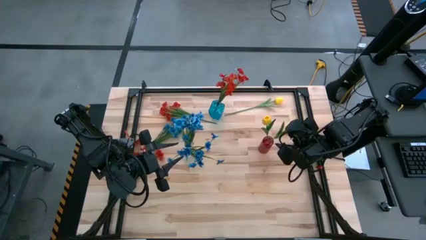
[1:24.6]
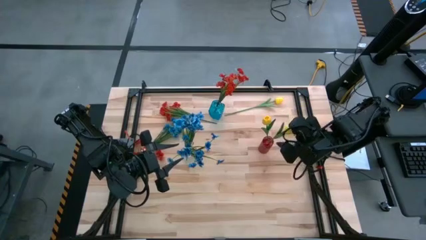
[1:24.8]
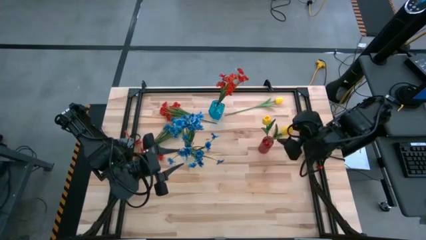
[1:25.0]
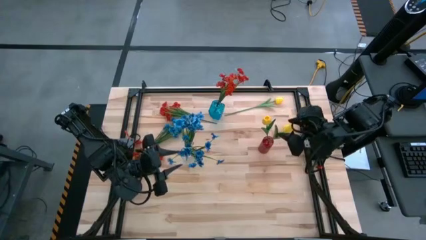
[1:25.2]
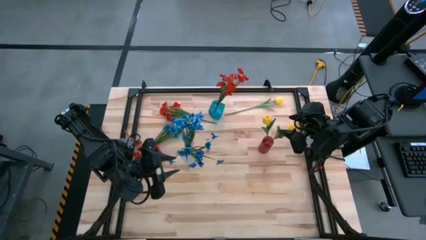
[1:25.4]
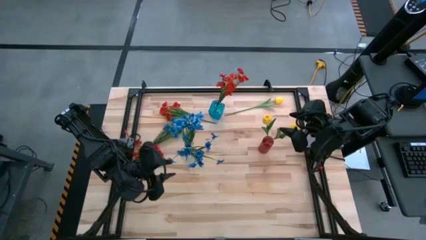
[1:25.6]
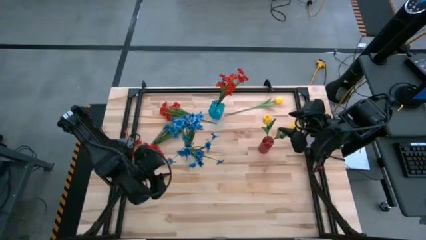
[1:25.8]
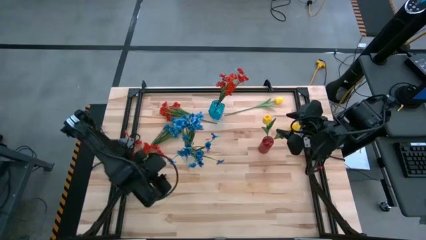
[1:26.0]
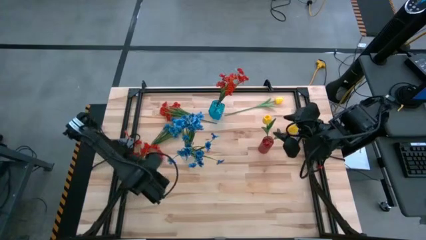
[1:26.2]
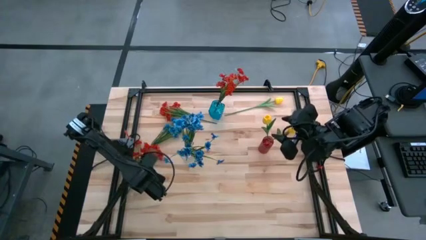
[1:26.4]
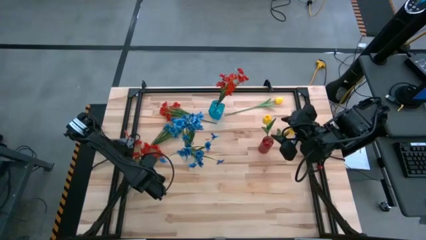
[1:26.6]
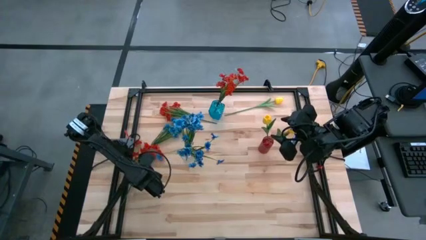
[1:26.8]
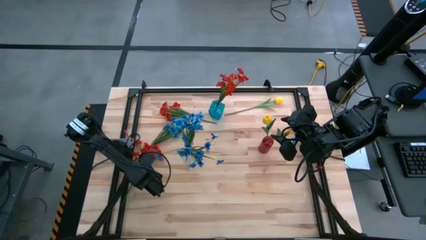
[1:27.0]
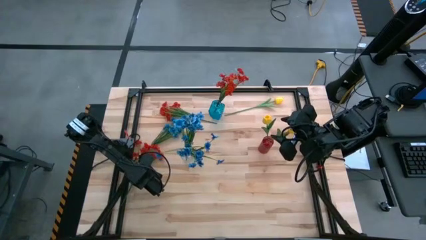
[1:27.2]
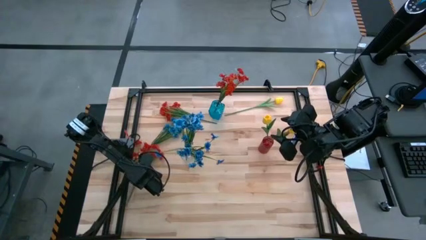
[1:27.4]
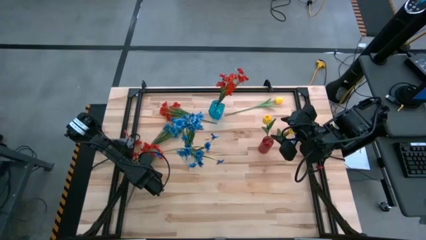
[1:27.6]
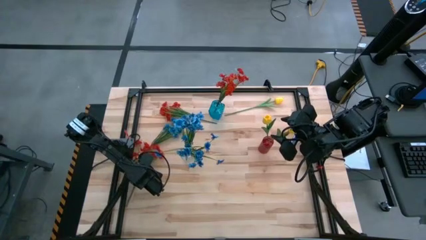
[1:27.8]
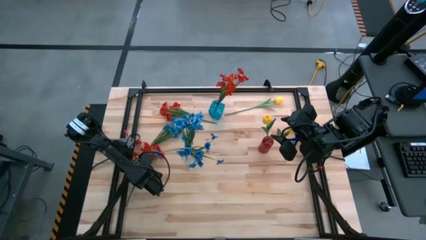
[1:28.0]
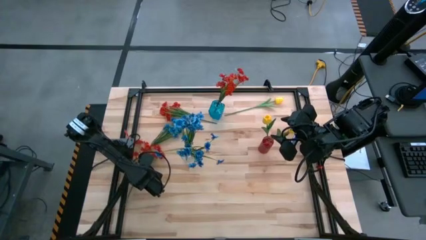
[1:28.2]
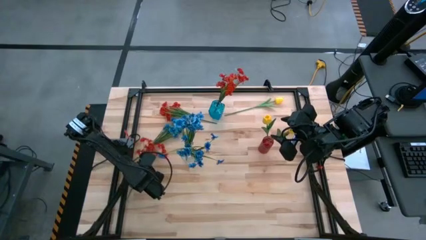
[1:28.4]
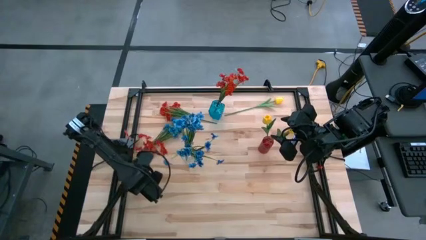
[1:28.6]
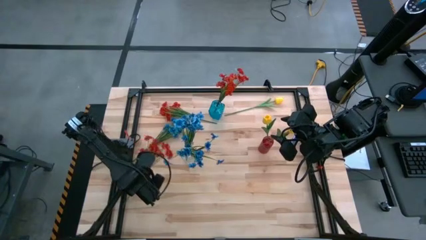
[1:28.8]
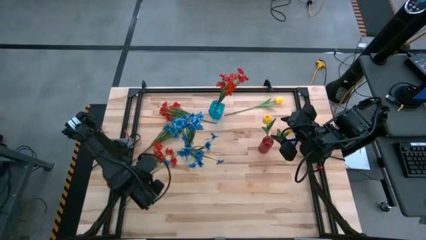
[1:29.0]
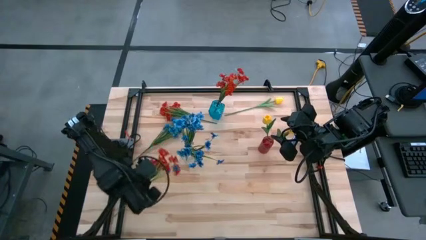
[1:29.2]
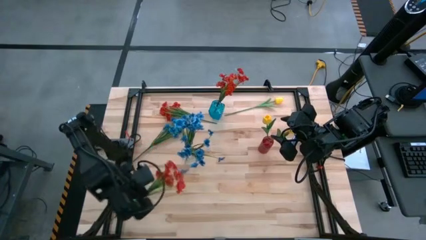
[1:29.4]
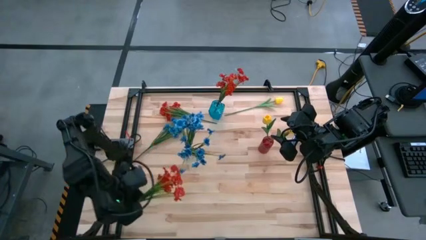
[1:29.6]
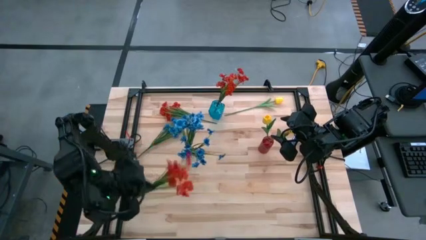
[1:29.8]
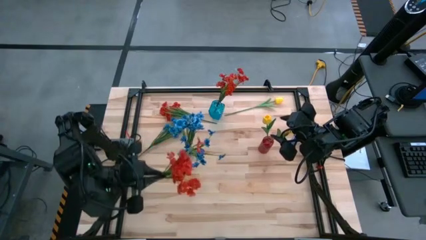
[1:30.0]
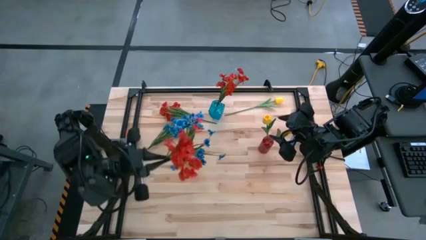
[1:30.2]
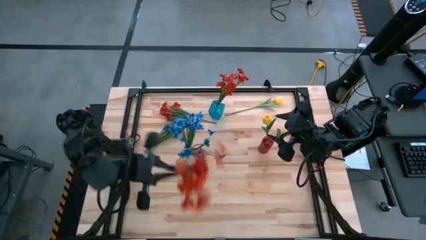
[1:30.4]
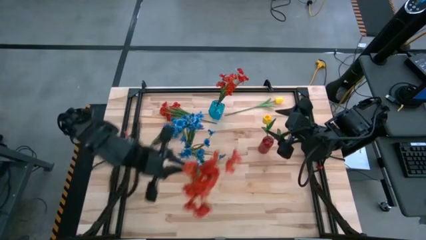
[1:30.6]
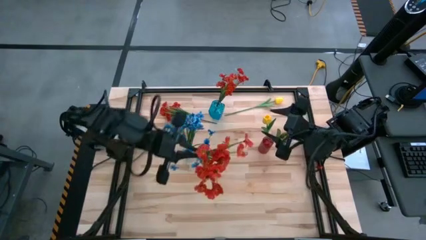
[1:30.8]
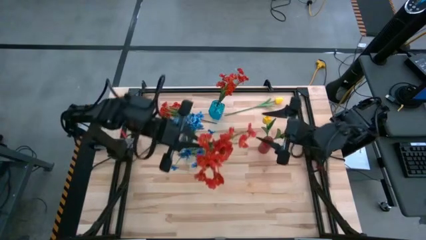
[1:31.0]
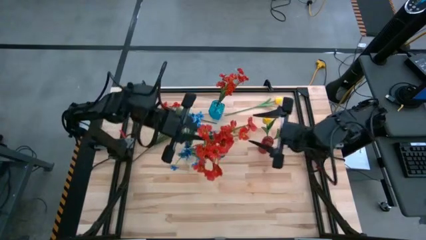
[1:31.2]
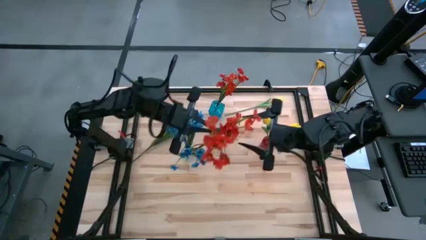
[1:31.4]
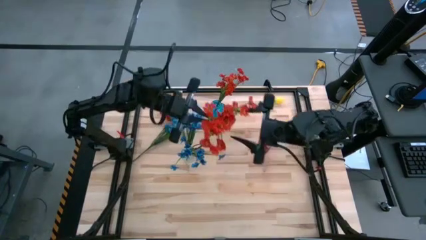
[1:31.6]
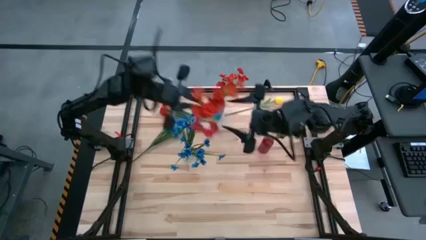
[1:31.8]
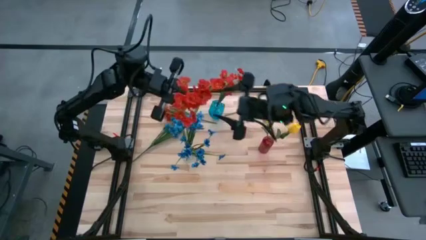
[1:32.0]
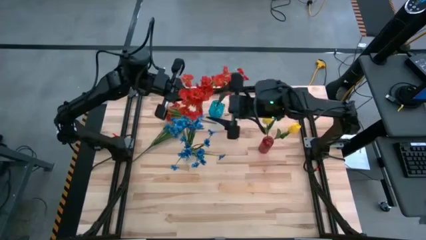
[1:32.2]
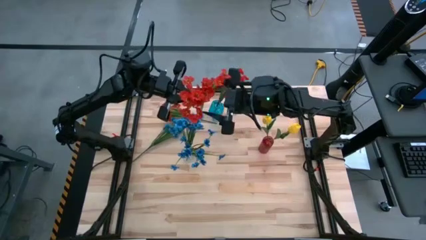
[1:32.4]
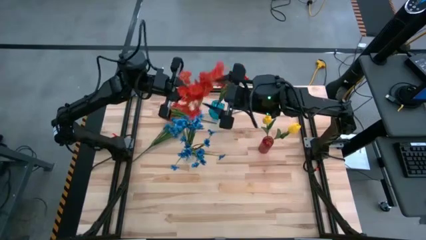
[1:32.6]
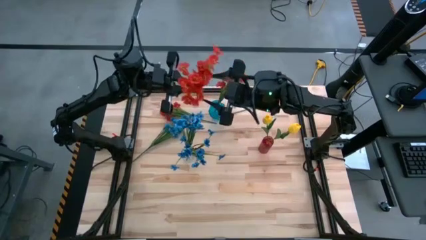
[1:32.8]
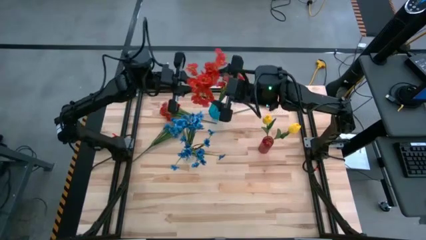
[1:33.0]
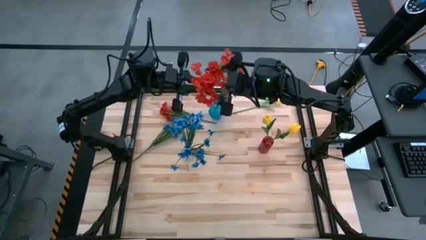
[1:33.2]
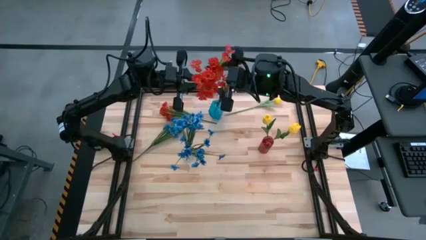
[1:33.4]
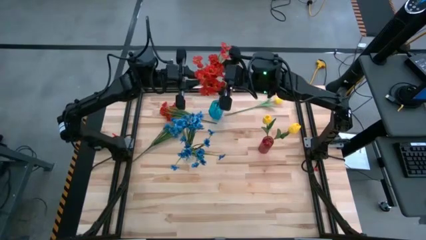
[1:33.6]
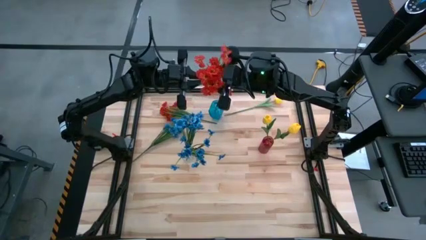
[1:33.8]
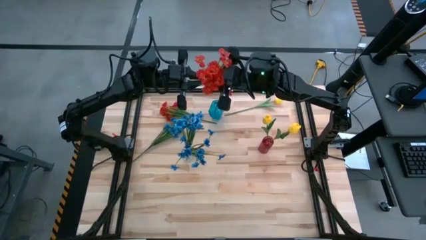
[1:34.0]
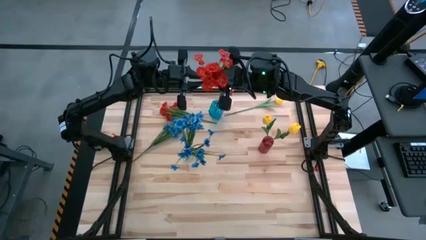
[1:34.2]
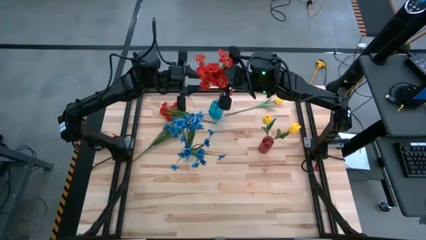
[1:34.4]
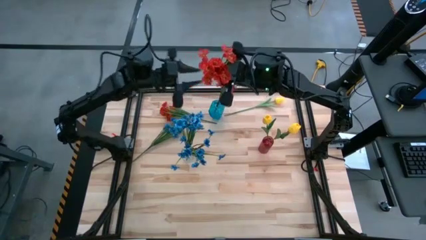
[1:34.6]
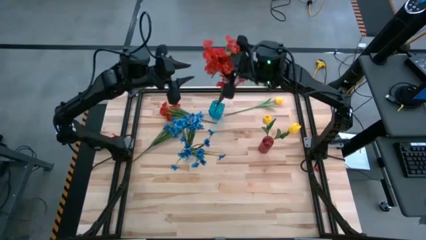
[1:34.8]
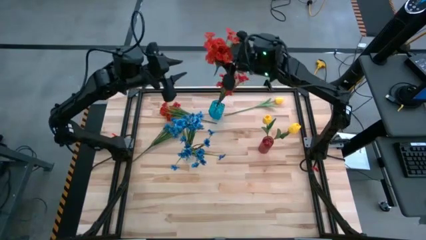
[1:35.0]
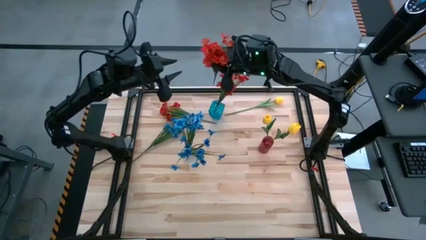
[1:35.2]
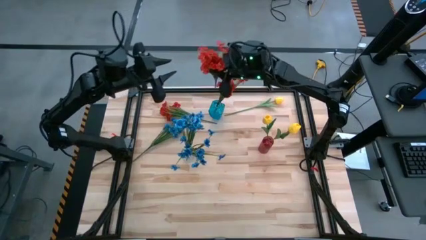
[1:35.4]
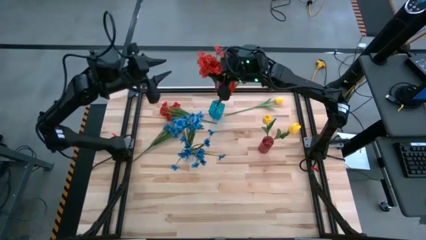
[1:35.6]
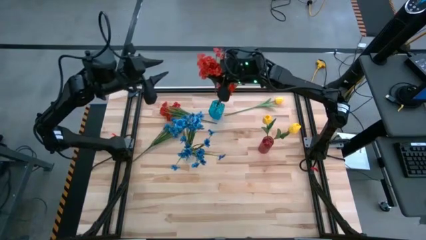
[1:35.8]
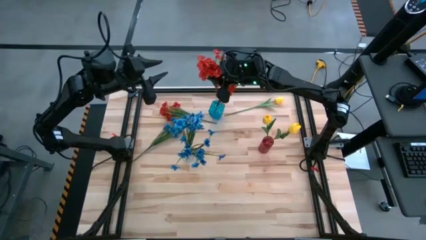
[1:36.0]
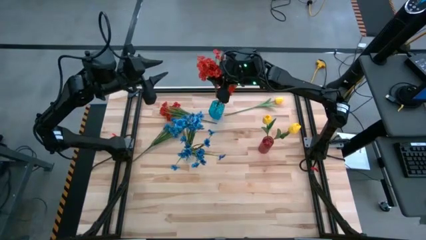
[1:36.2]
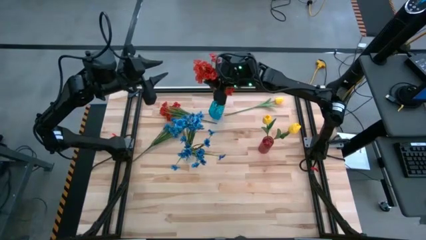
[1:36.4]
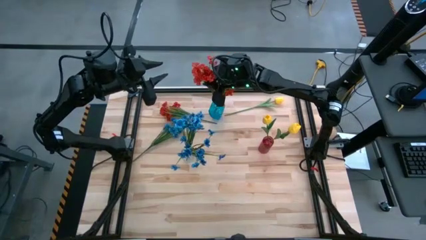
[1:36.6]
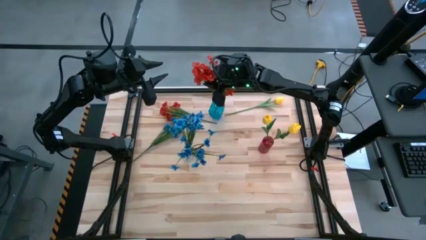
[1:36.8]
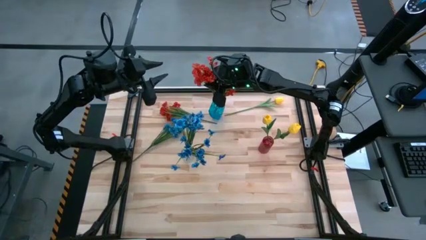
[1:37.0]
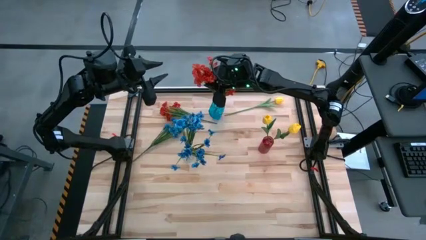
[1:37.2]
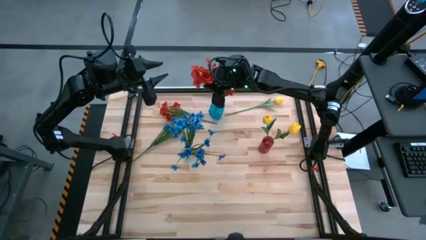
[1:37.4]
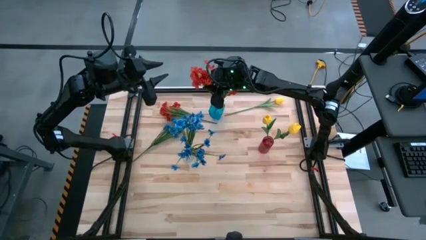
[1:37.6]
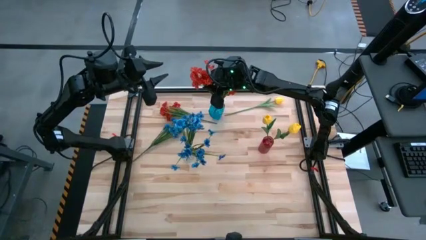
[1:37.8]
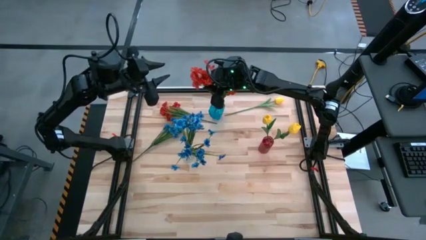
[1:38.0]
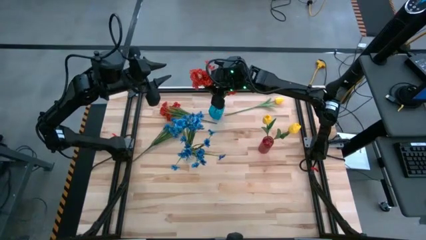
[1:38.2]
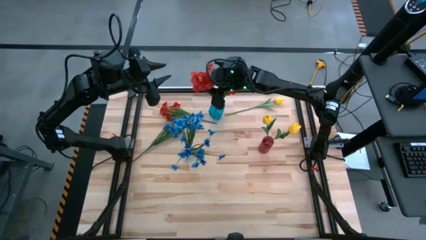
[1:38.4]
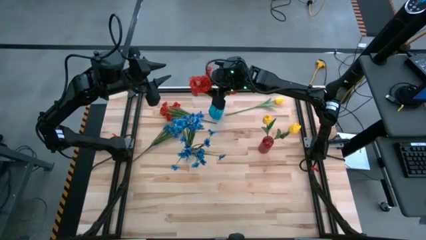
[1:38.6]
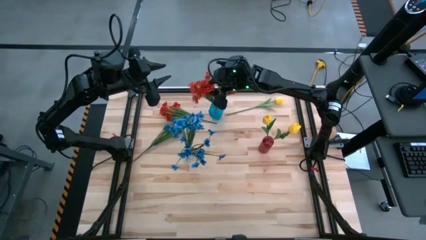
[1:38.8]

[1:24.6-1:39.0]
Task: Sort flowers into vase by color
Put the bottom red flowers into the blue vase
